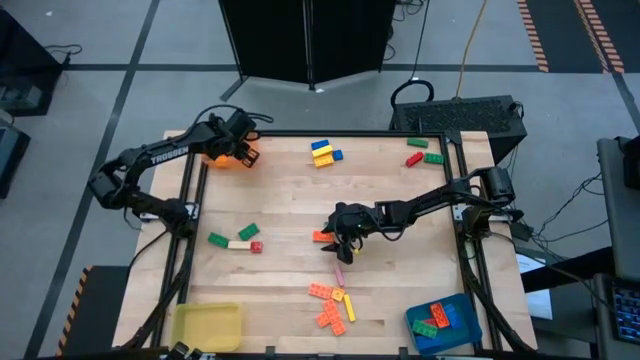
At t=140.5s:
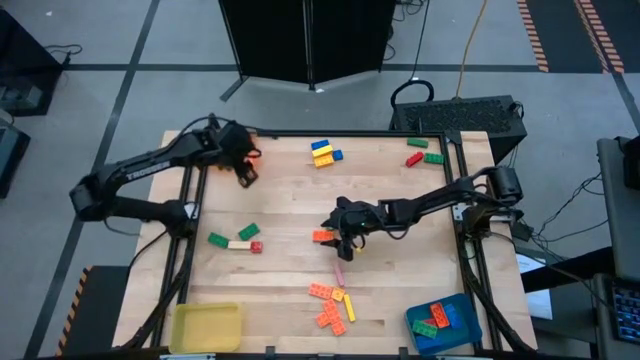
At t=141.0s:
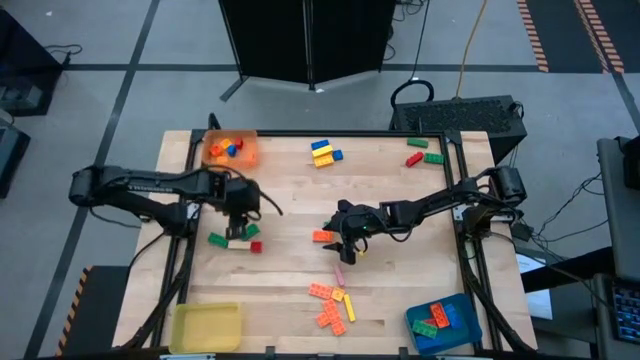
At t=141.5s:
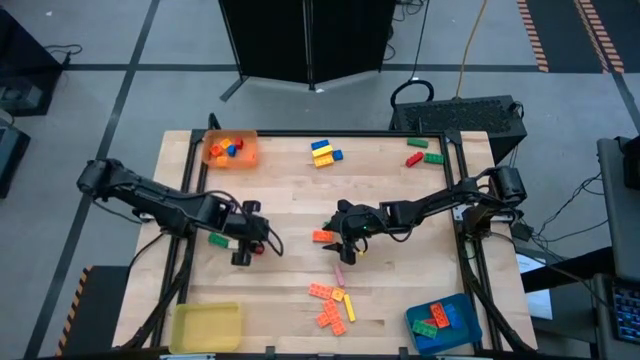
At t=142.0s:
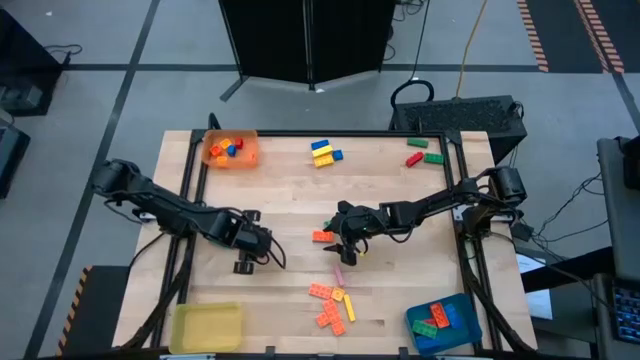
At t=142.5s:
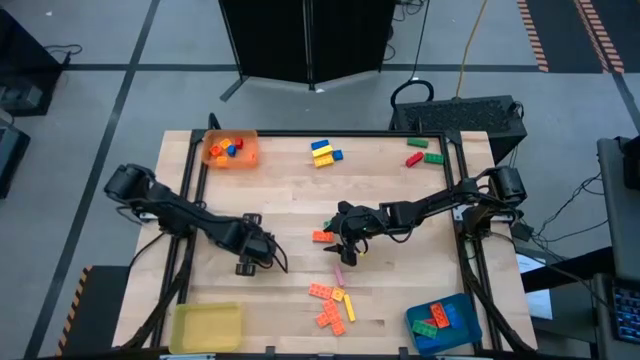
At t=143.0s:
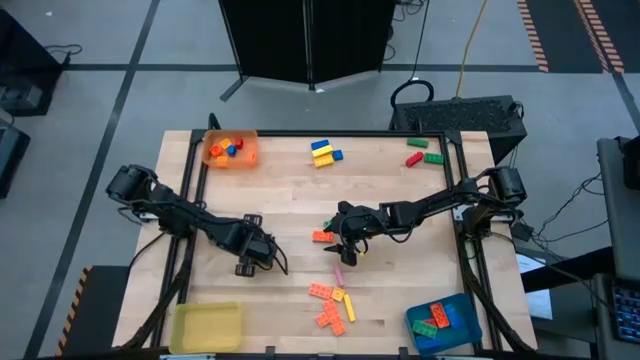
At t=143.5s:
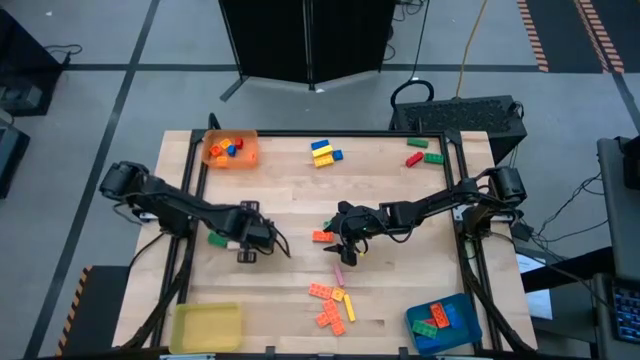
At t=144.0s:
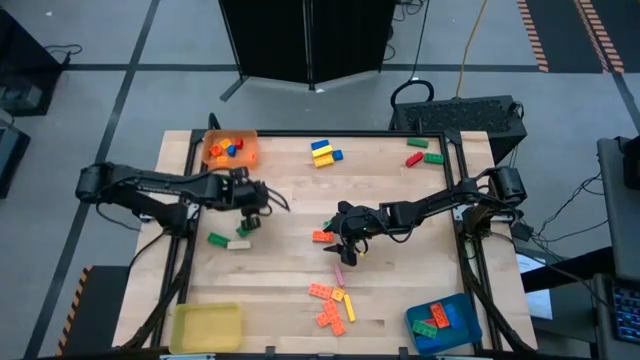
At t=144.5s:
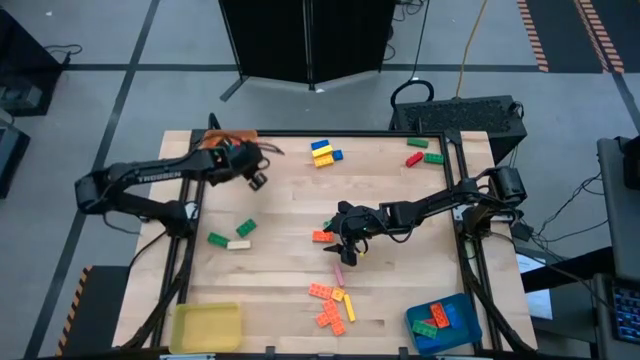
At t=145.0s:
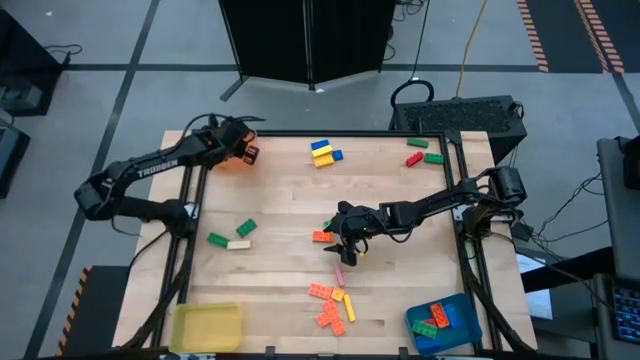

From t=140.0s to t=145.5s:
Task: Sort blocks by size
Put the red 4 stud game piece into the orange bin

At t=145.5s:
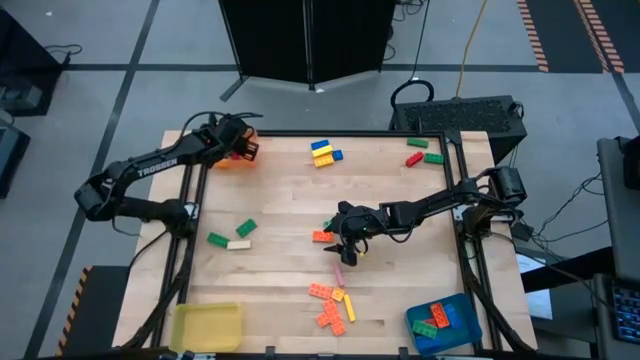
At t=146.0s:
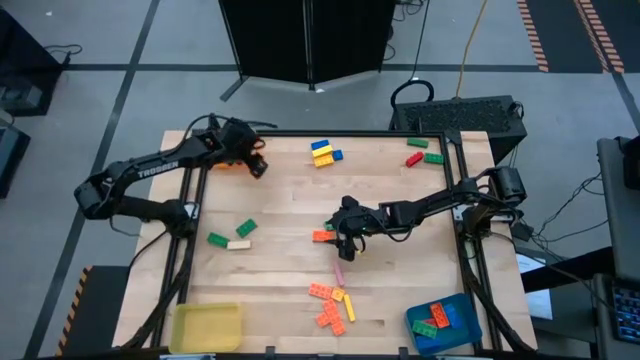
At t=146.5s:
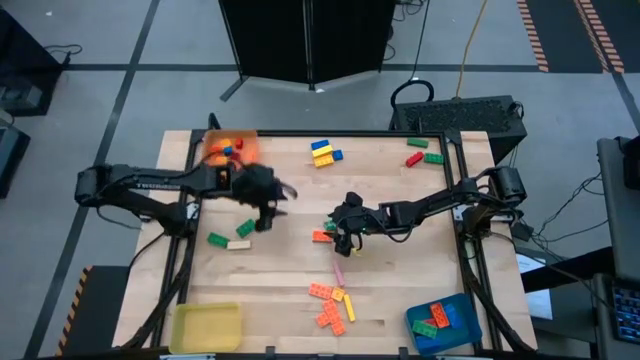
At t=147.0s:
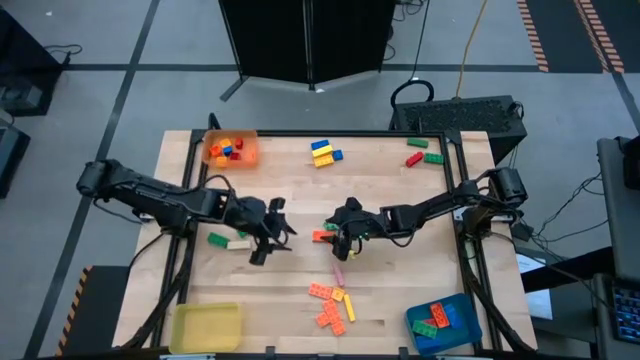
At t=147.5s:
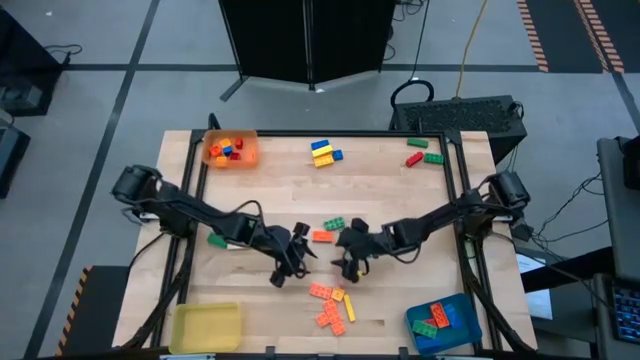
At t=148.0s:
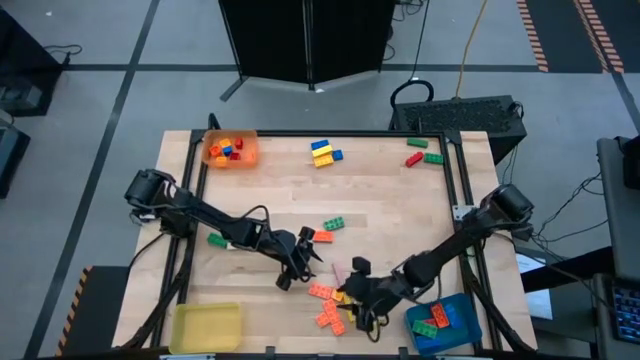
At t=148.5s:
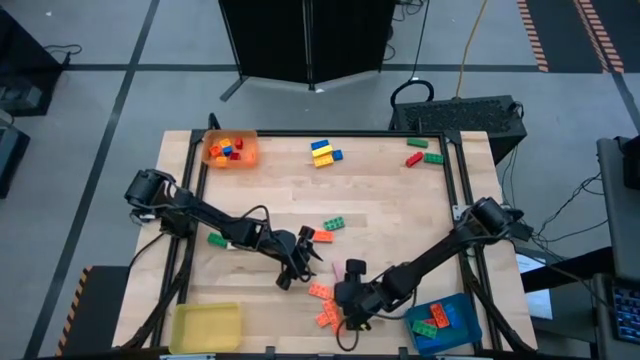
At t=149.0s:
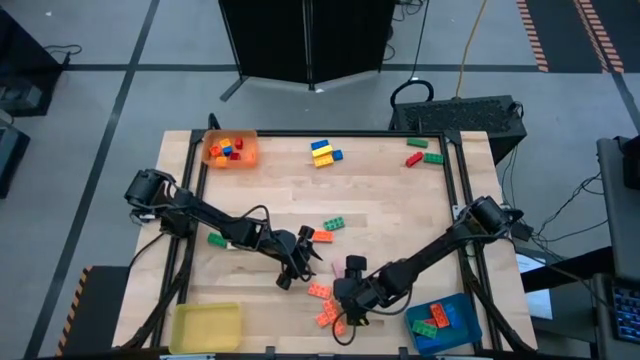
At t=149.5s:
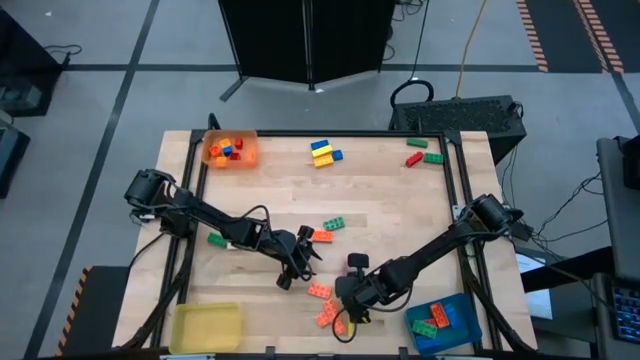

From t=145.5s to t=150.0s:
Put the yellow 4 stud game piece into the orange bin

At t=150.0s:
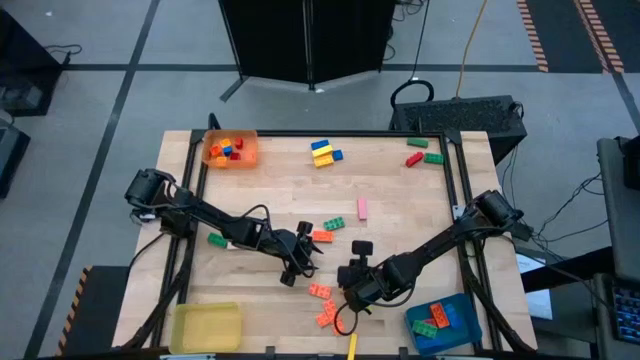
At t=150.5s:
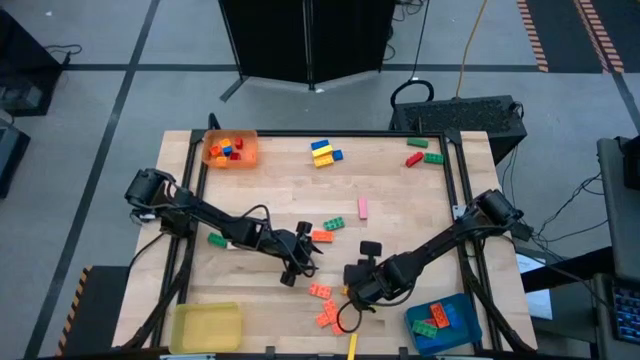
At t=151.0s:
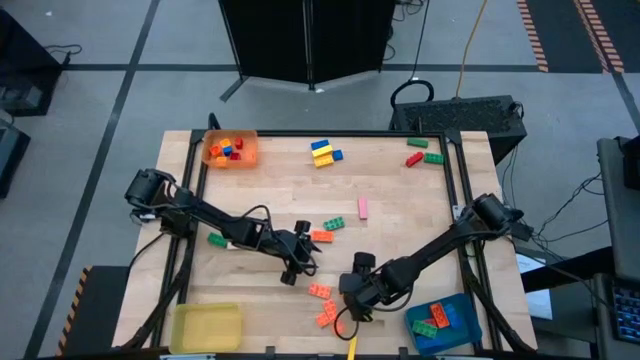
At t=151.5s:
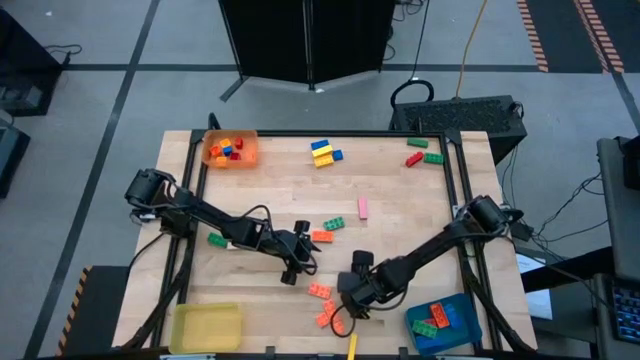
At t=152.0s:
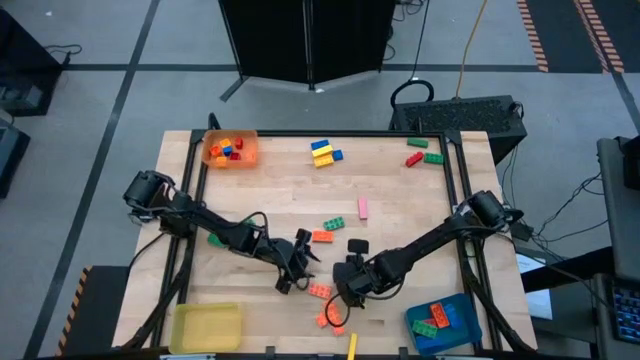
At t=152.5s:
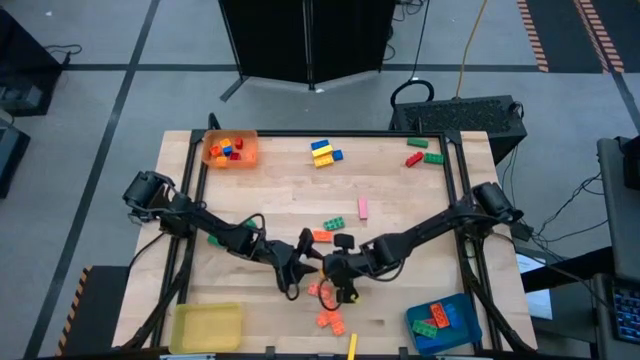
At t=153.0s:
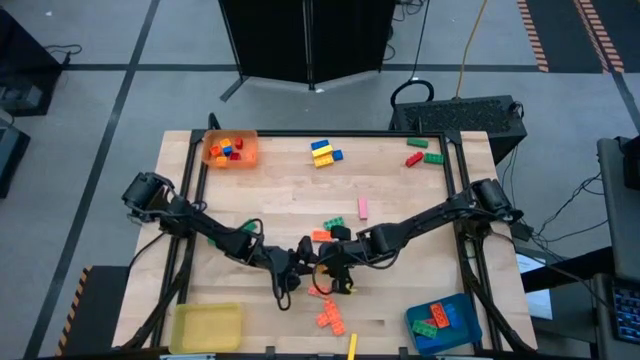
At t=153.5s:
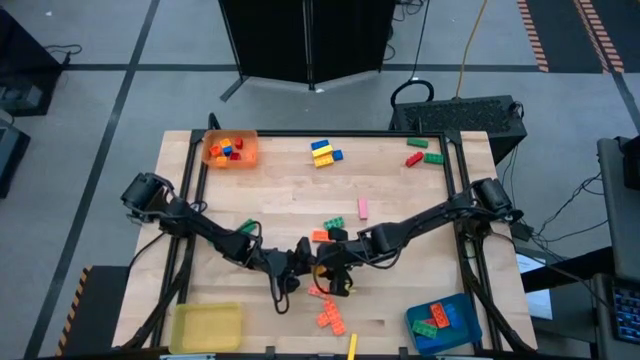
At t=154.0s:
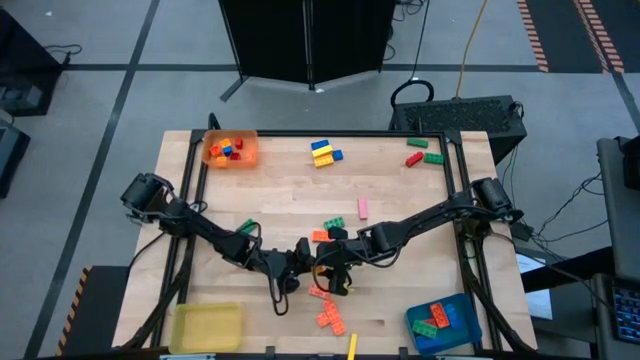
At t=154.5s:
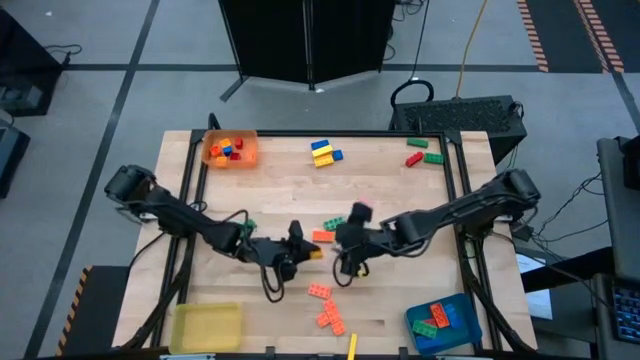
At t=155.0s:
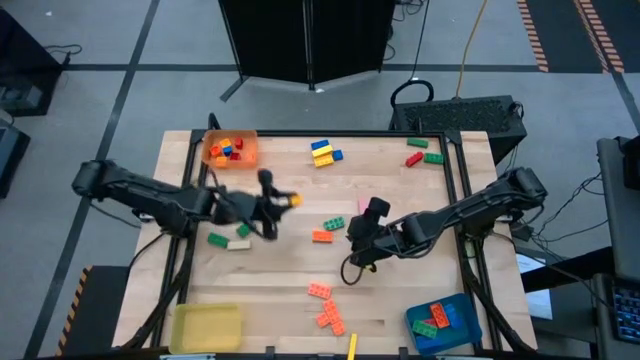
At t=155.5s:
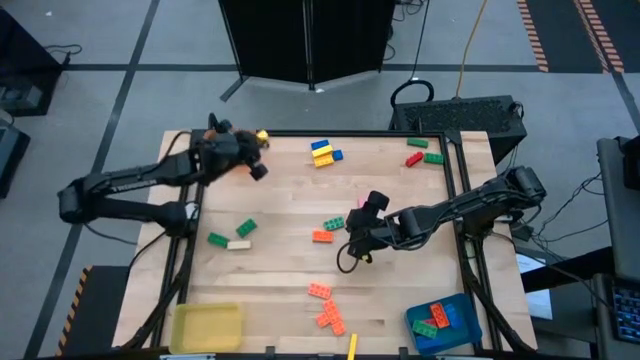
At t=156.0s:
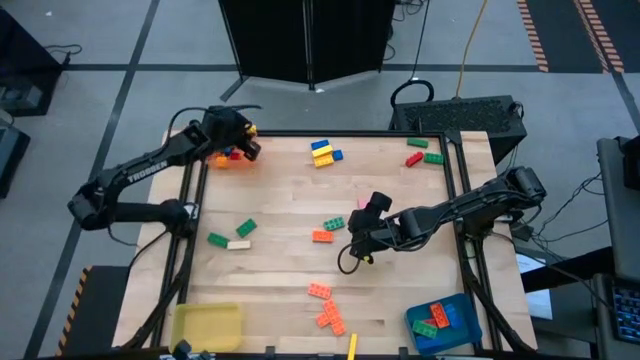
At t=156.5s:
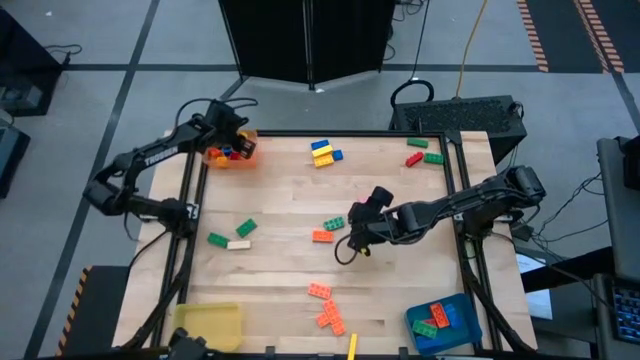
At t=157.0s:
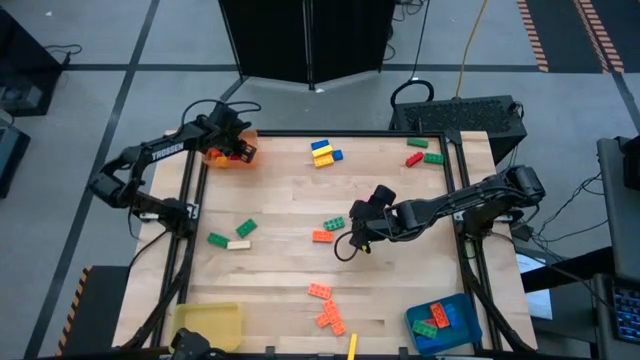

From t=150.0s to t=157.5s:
Put the yellow 4 stud game piece into the orange bin

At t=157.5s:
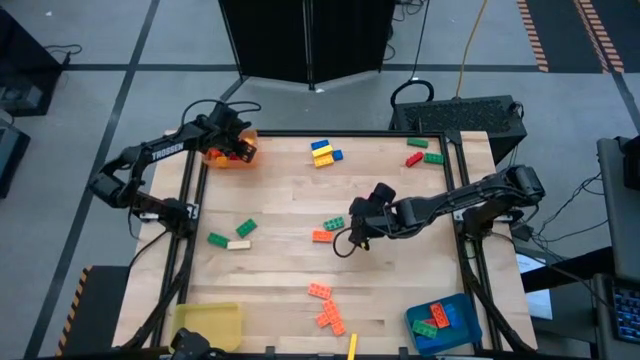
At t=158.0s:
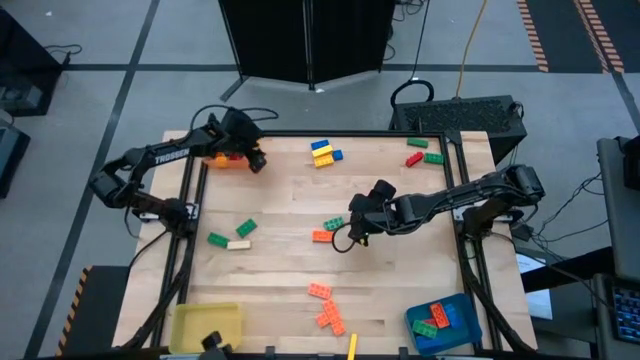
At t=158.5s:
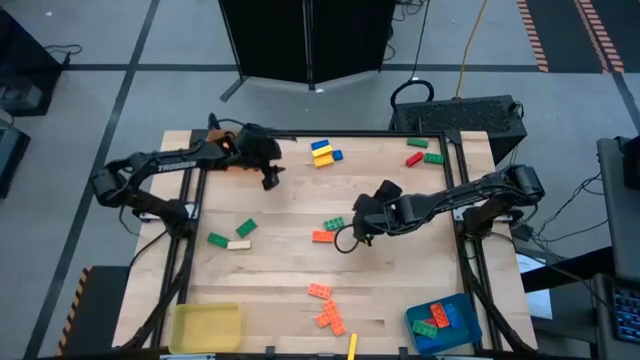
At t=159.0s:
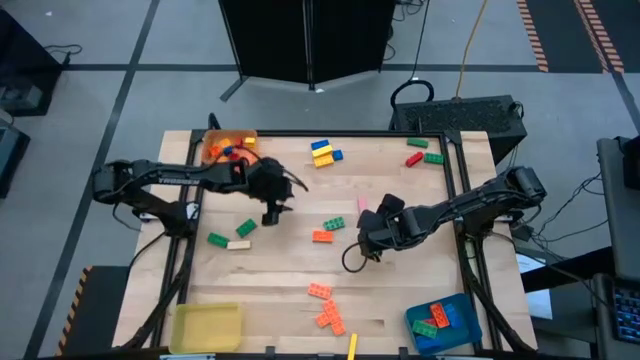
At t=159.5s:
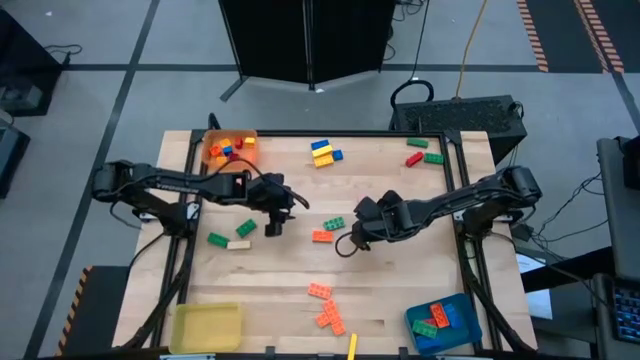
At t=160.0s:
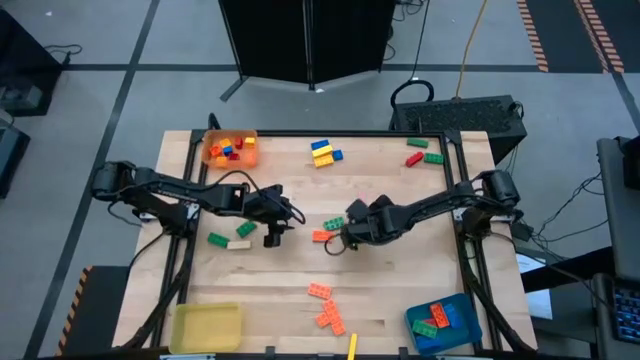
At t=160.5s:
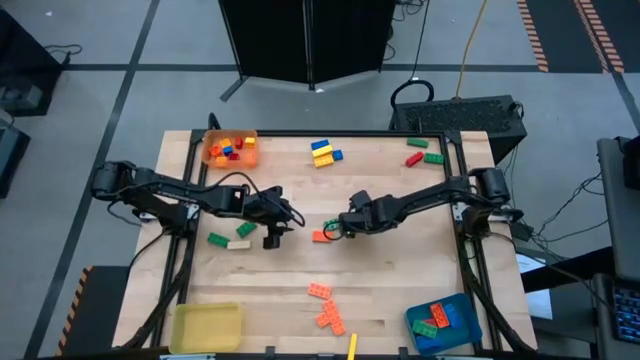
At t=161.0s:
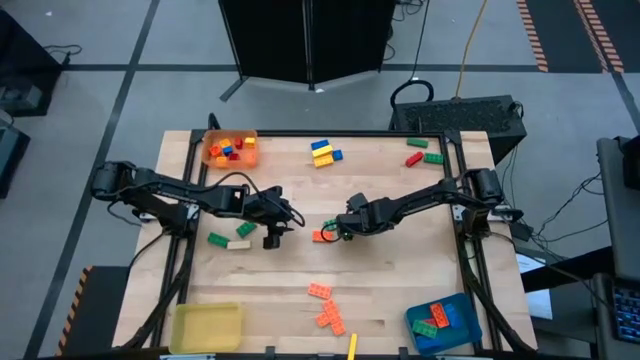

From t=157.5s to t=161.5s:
Put the pink block into the yellow bin
